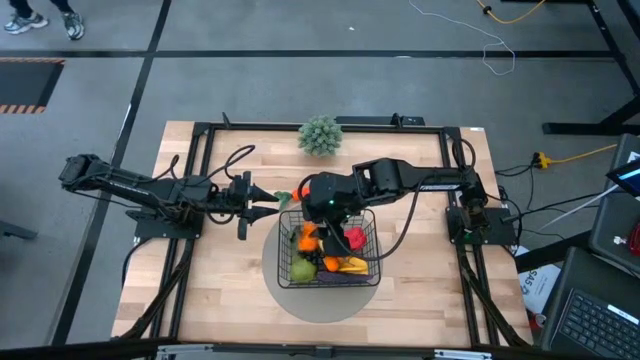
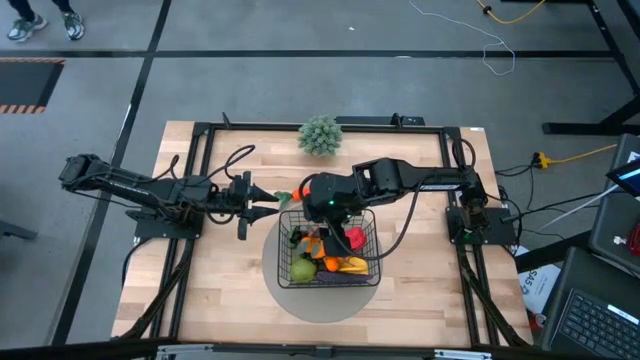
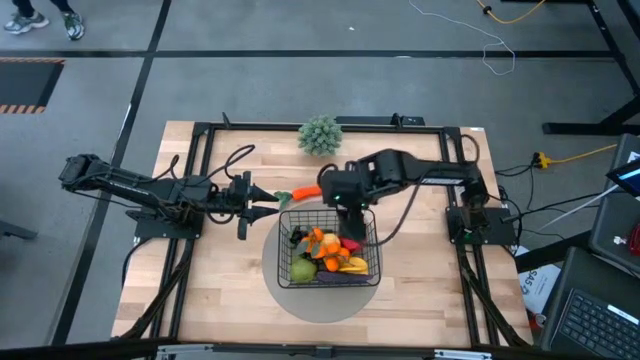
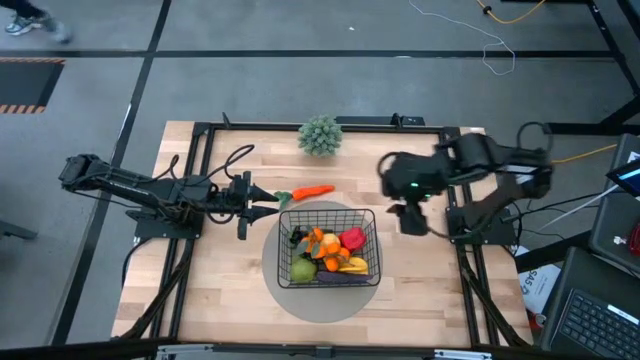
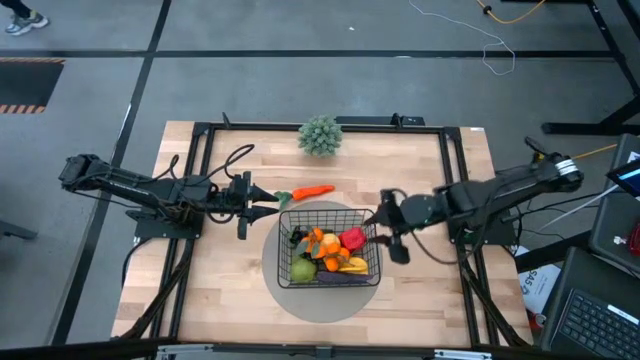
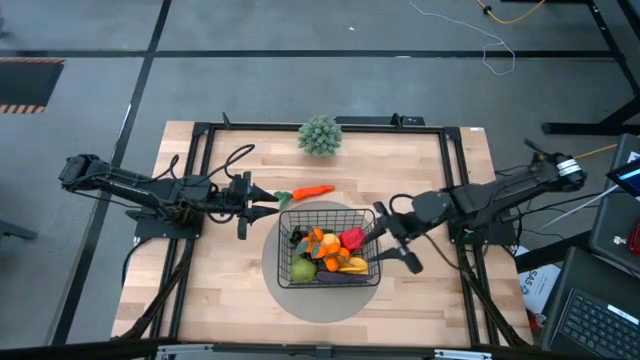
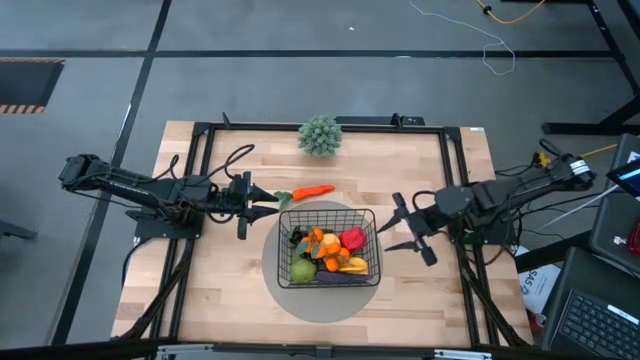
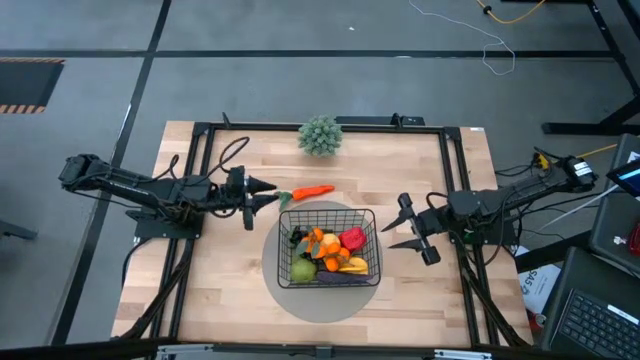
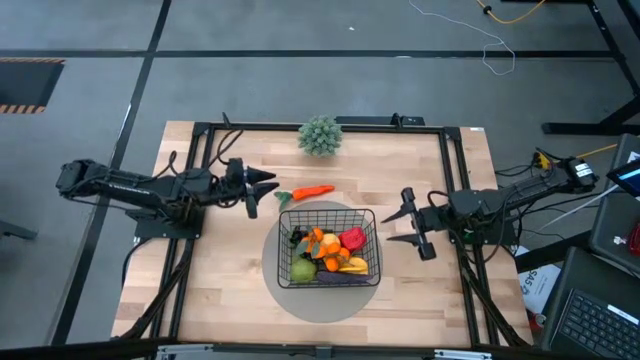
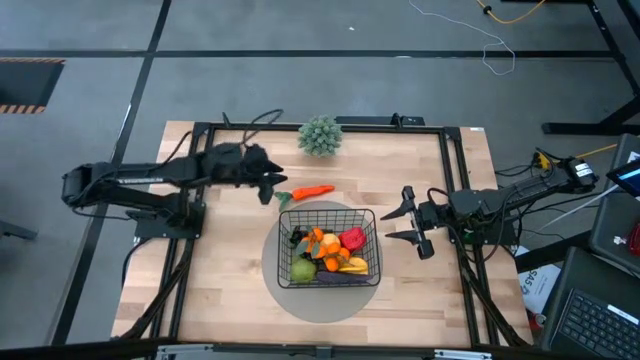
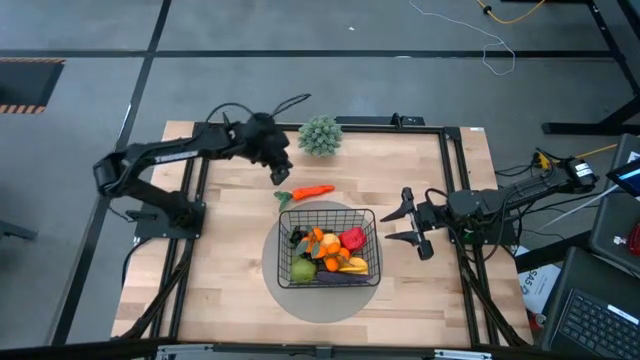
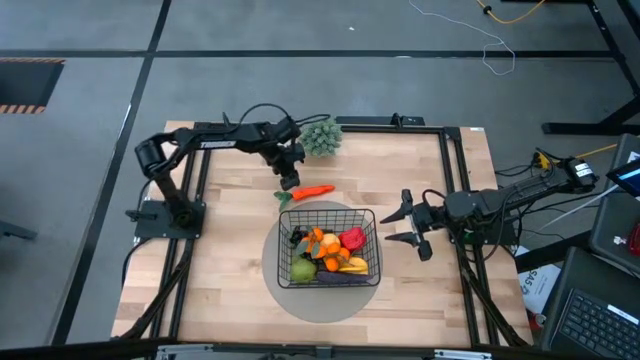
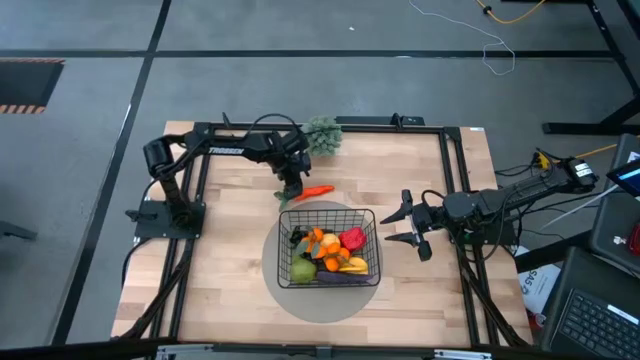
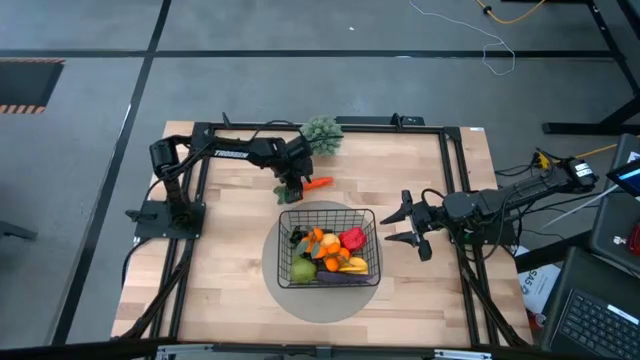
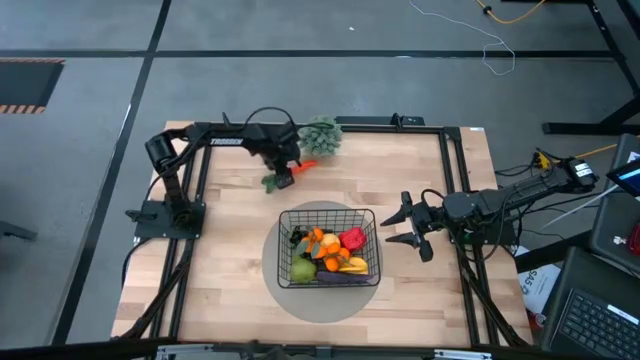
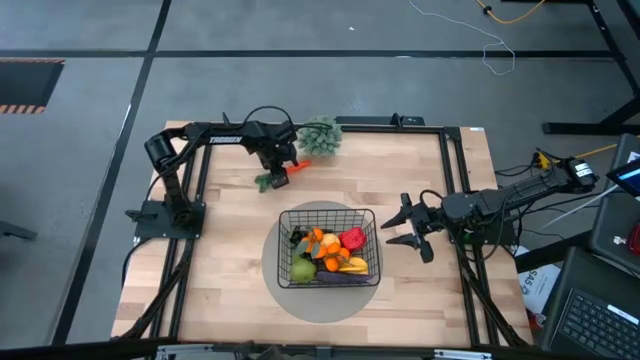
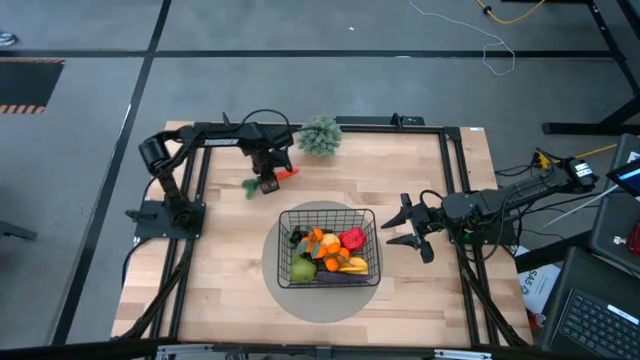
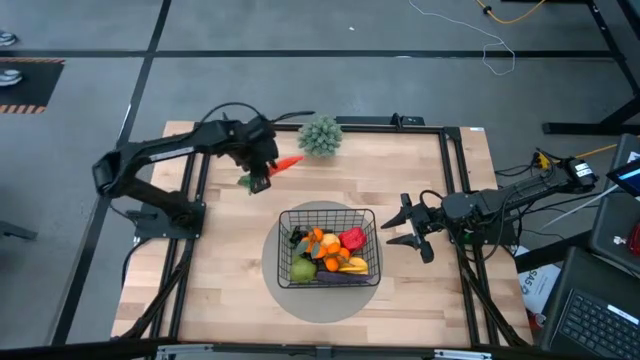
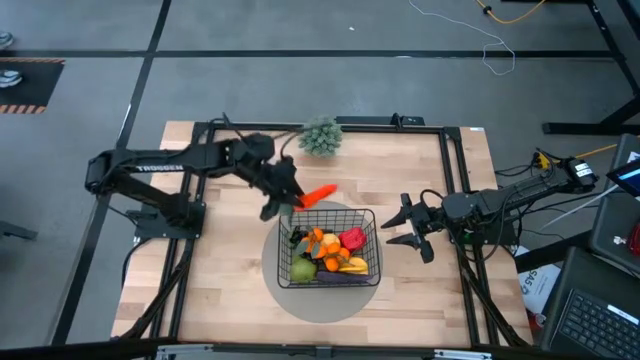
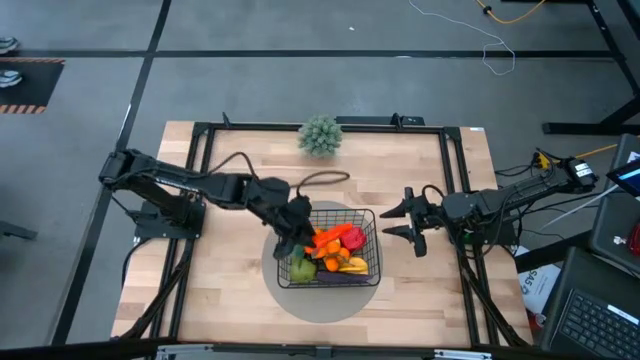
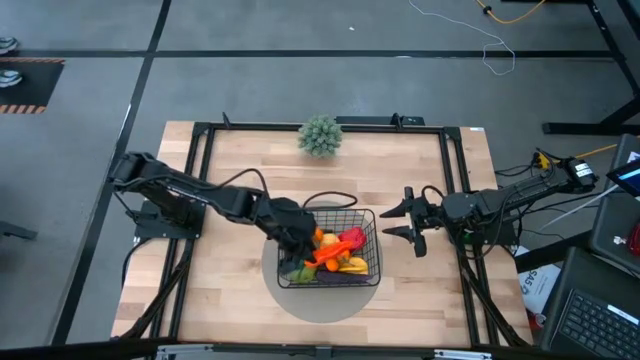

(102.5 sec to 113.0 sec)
Task: Build produce basket
Put the carrot into the black wire basket

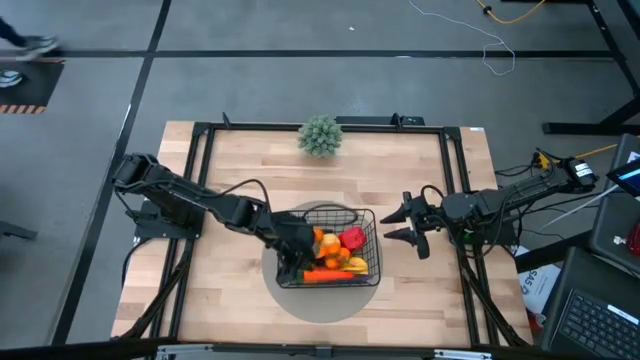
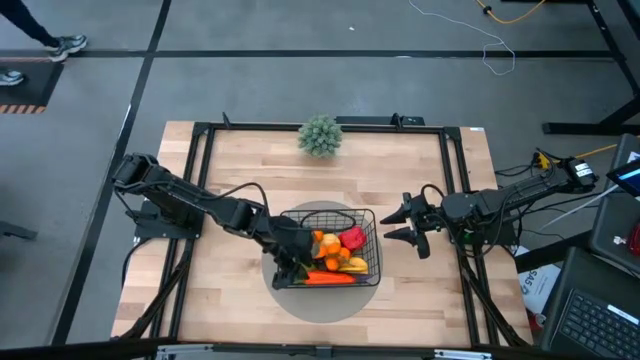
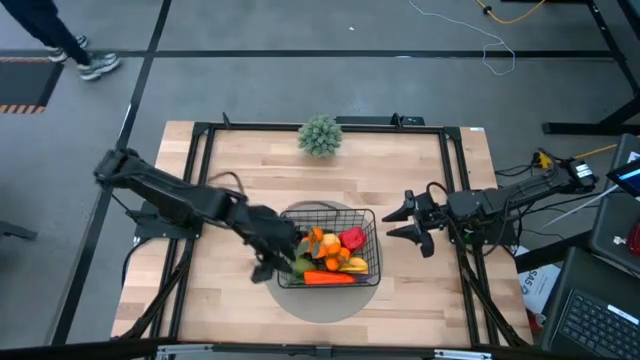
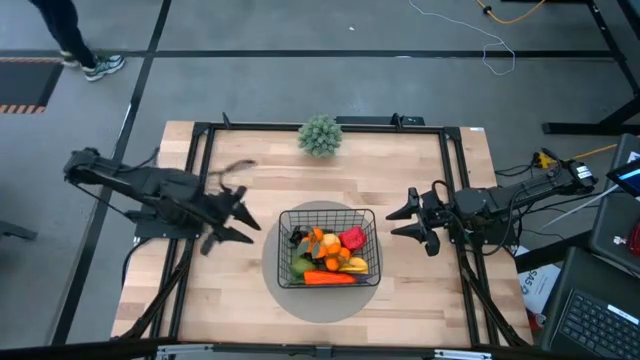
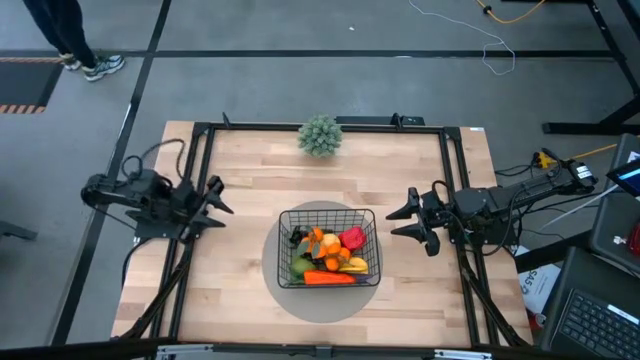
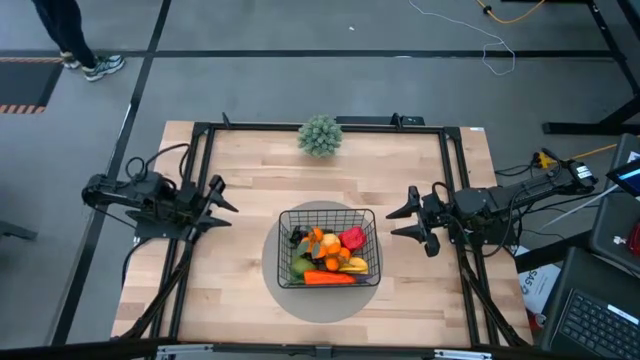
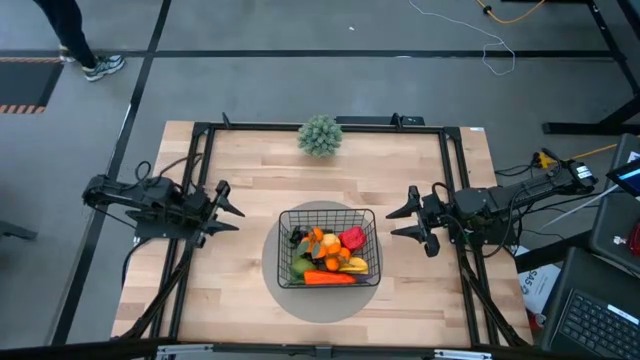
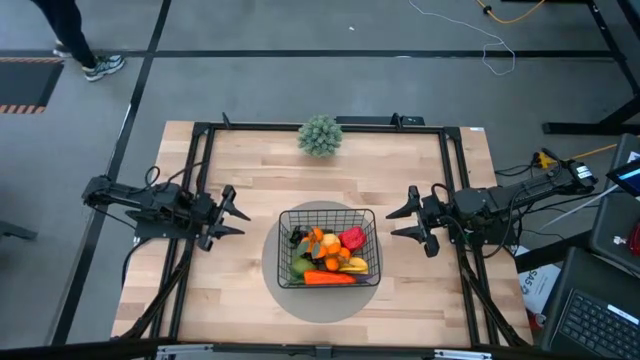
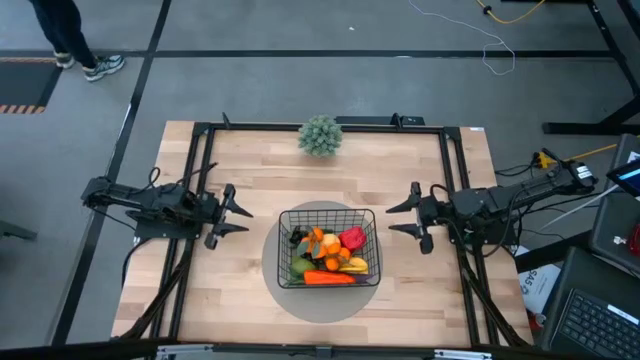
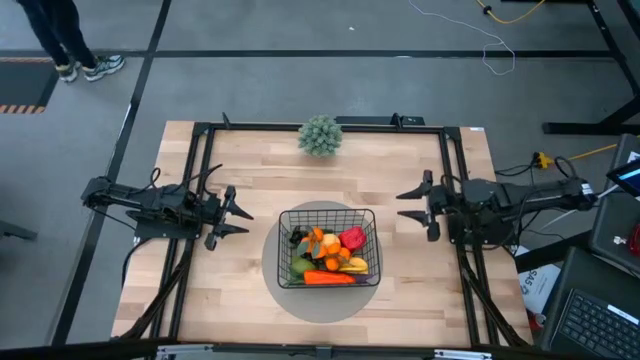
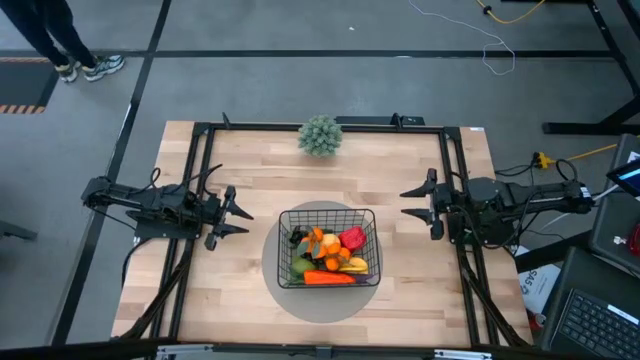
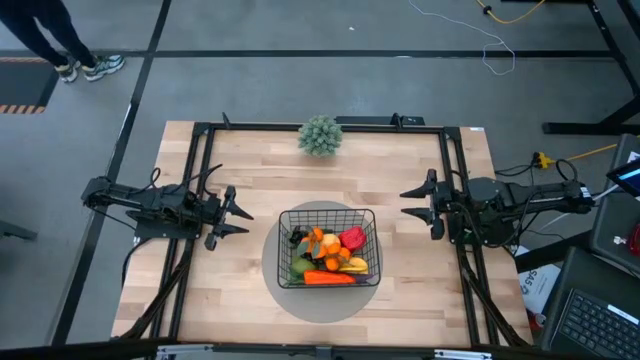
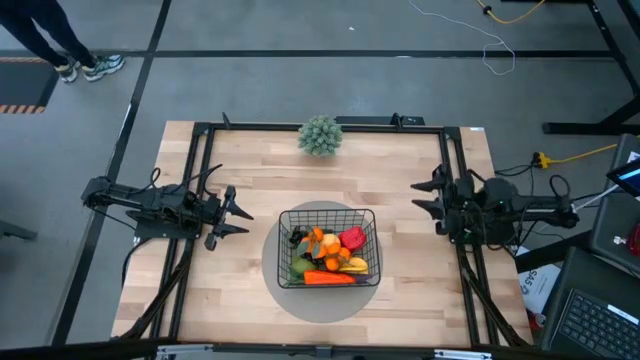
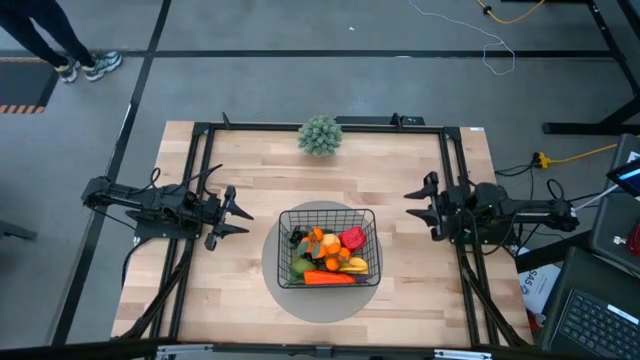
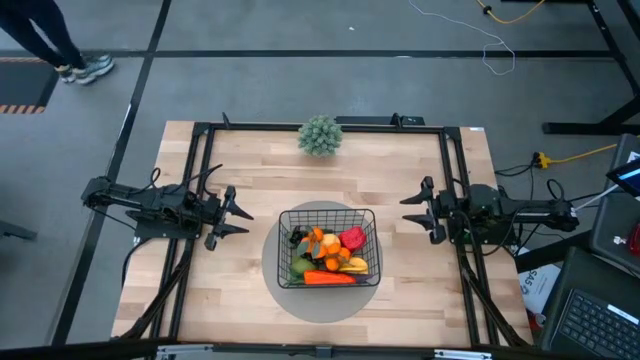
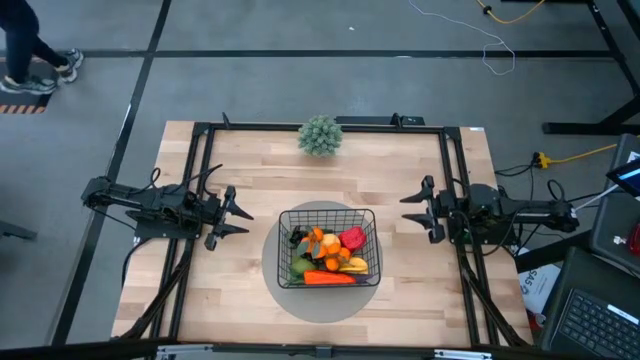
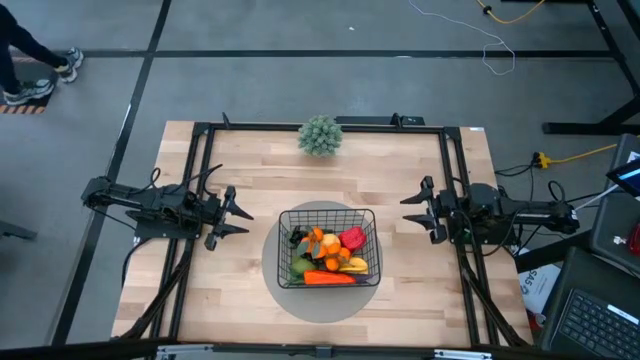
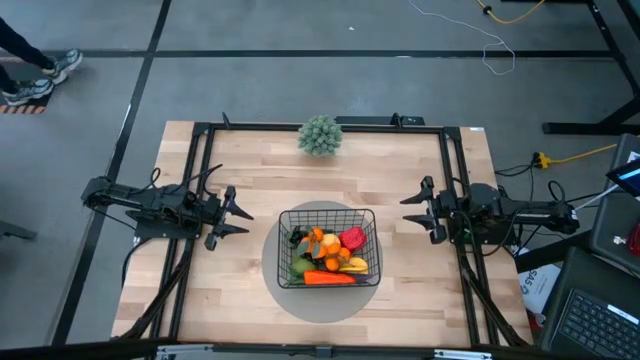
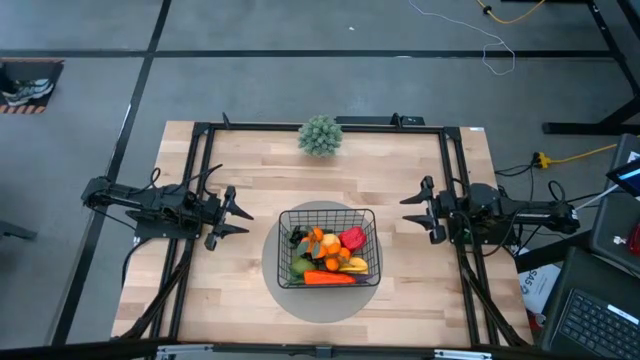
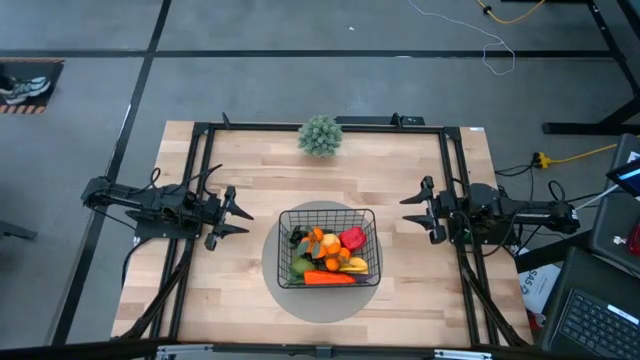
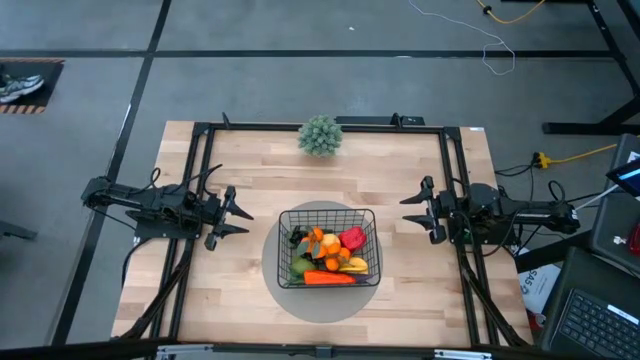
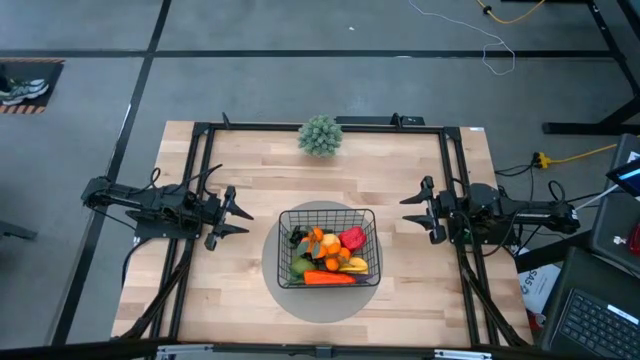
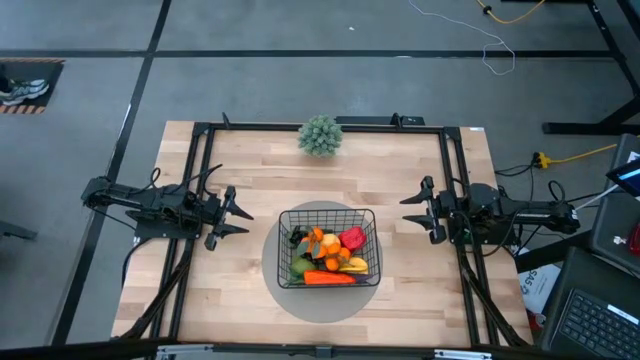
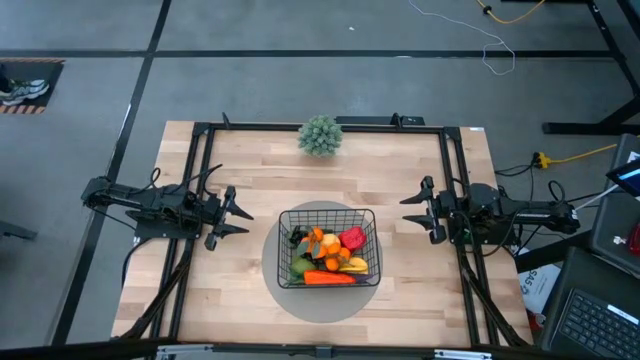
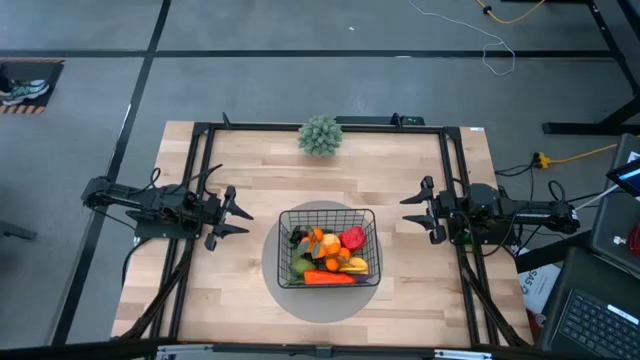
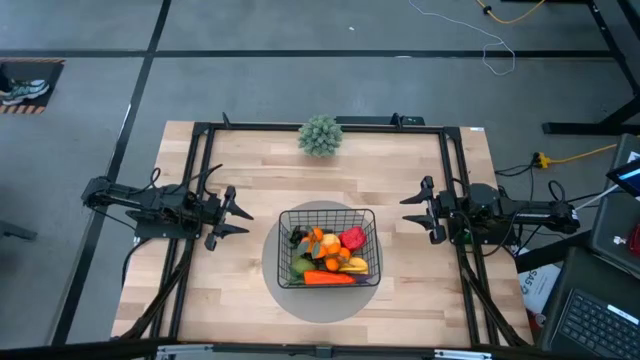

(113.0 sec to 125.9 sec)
Return to Home Position
